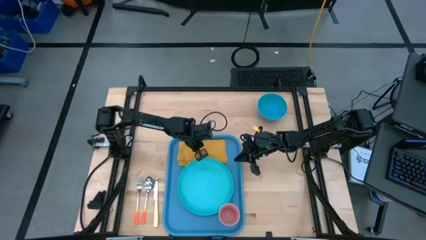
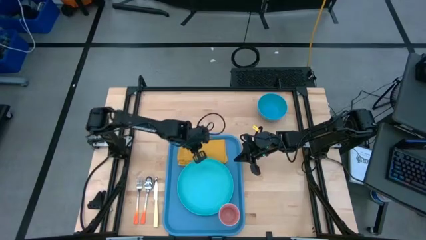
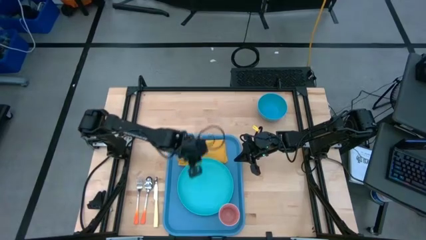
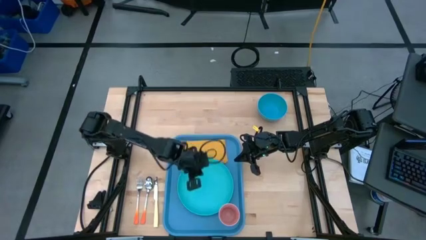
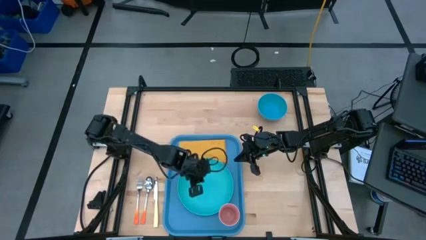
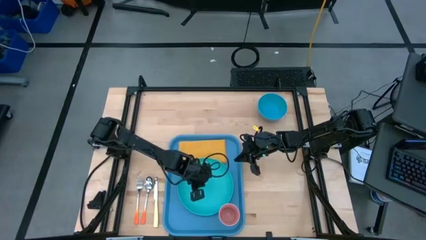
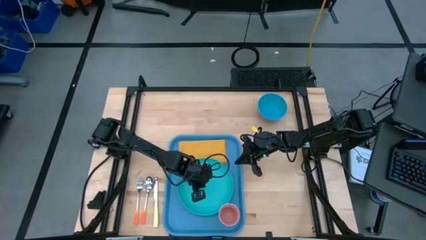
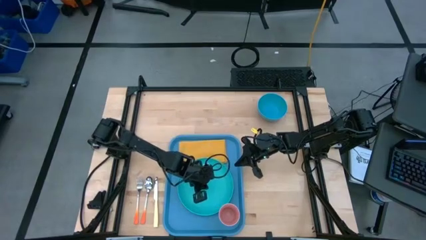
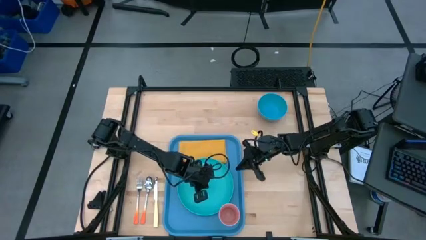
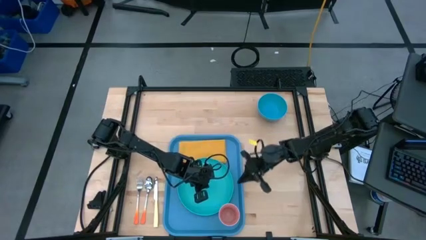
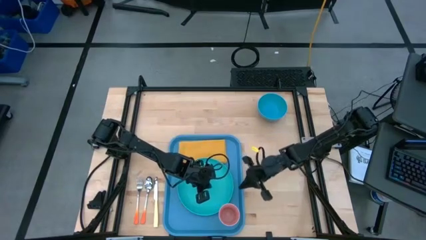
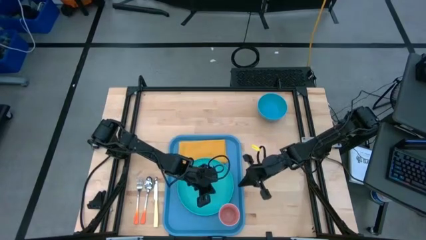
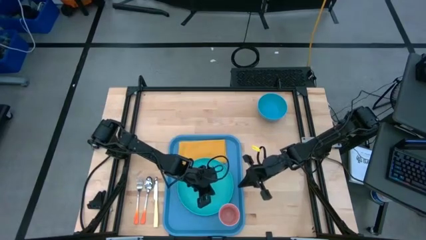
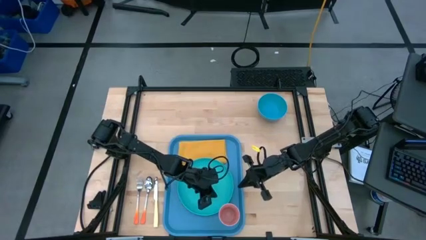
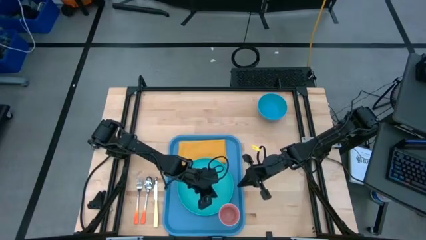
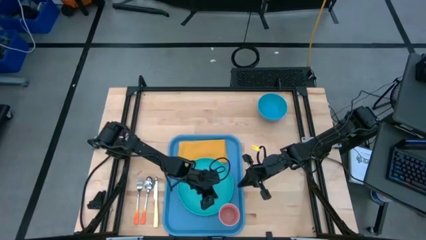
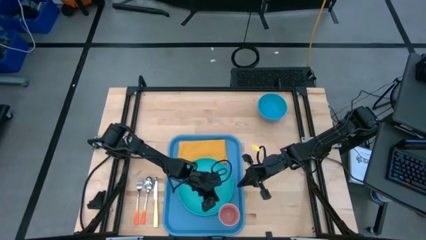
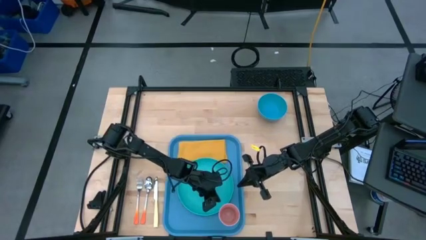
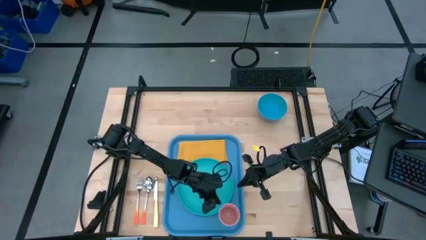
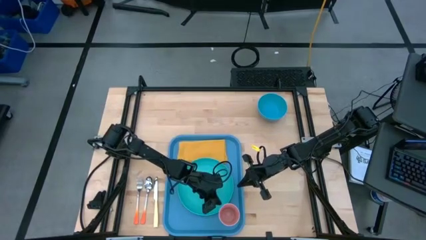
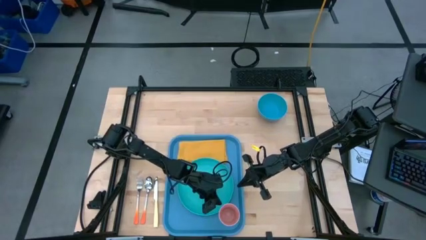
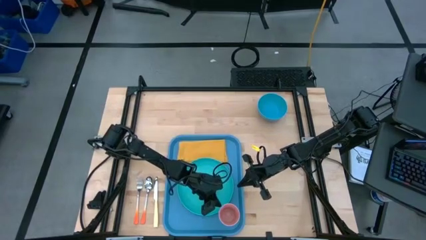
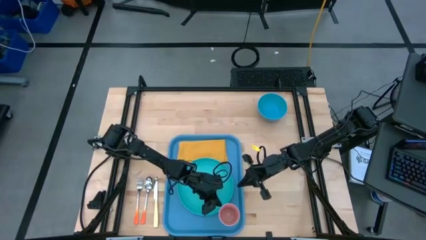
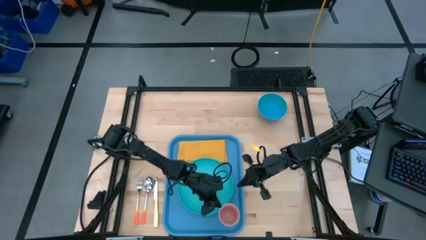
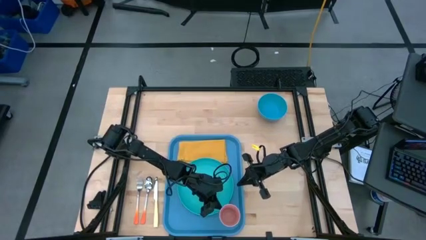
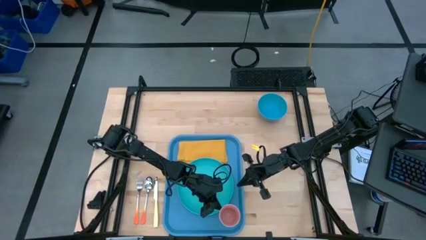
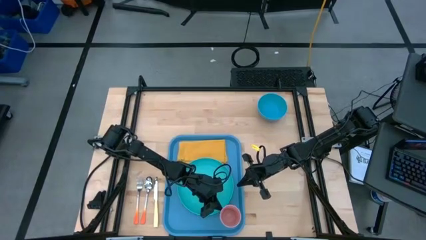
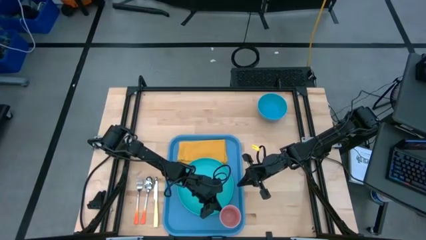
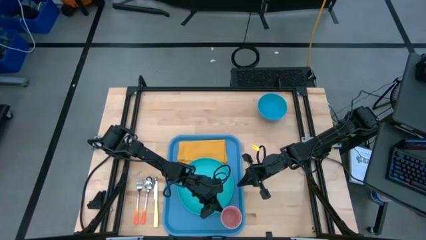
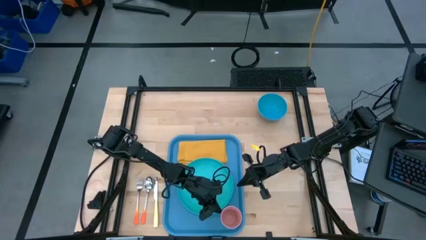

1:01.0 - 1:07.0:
Task: Set up tray
Adjust the pink cup on the blue serving tray

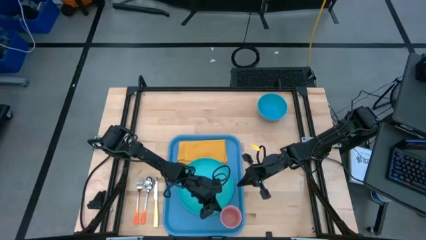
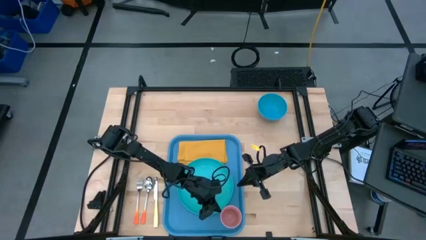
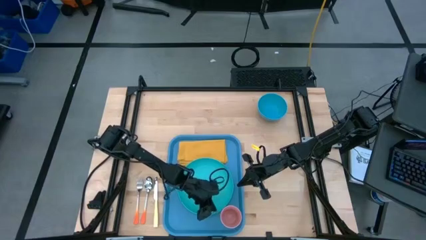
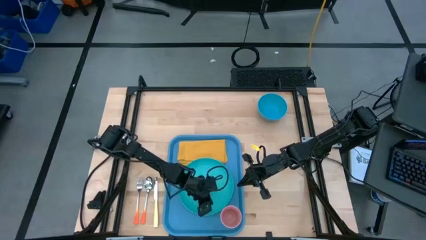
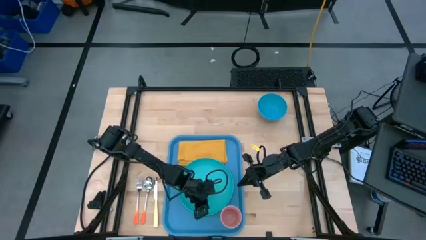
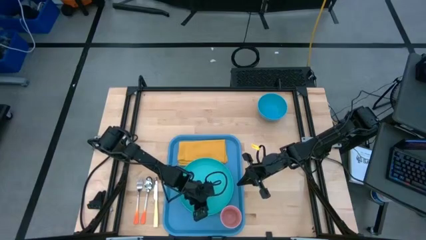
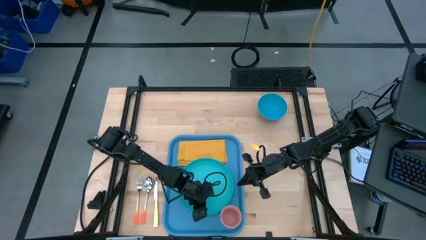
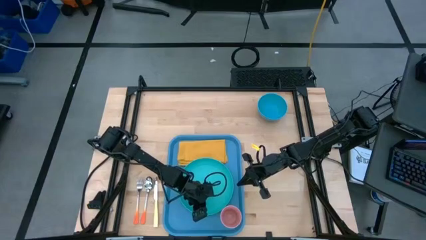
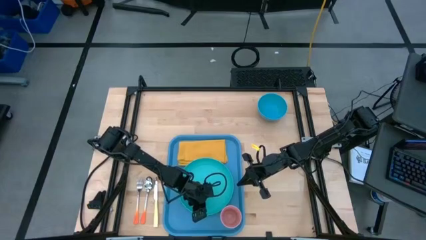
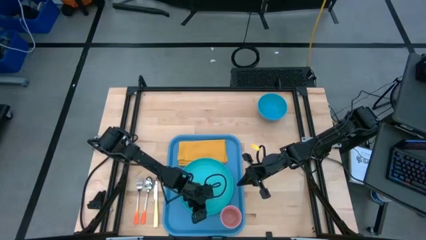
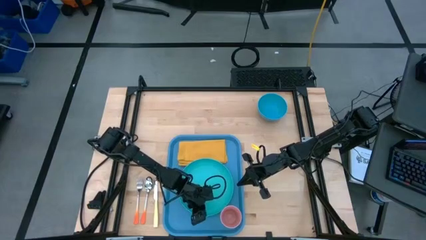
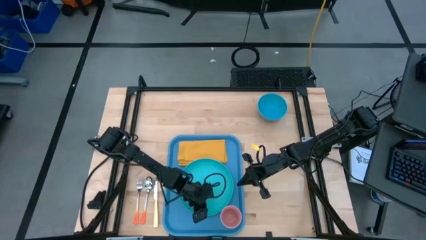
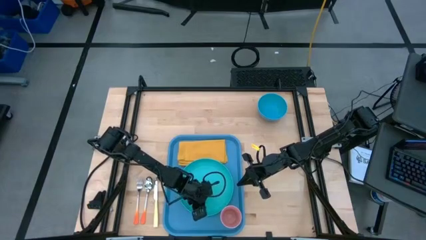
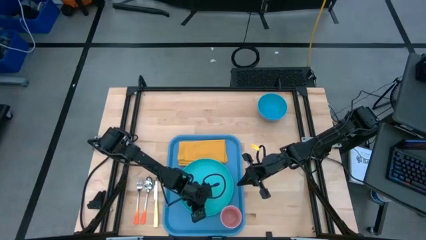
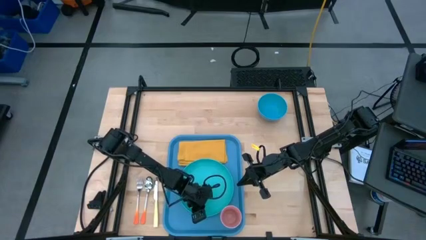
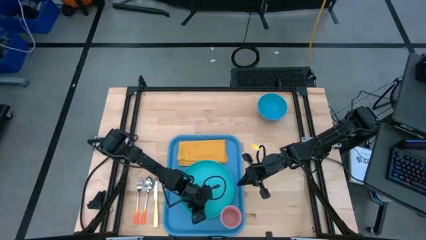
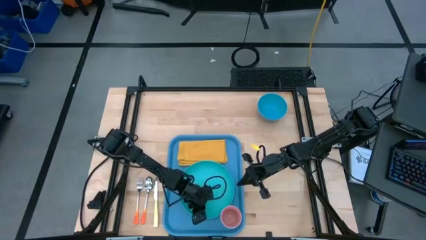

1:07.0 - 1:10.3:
Adjust the blue plate on the blue serving tray

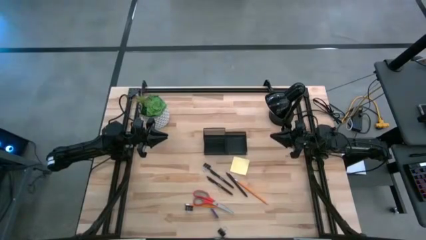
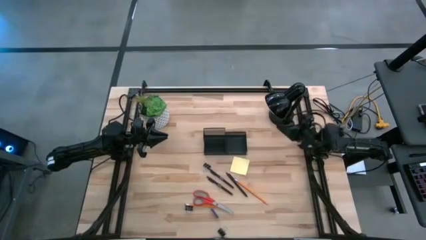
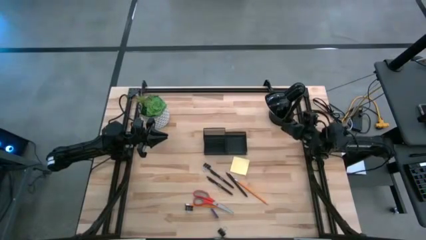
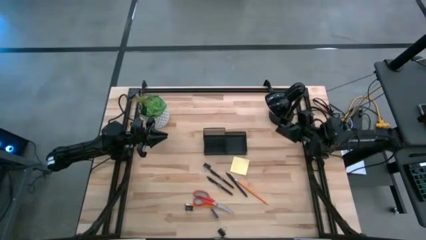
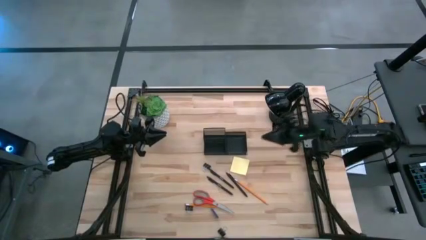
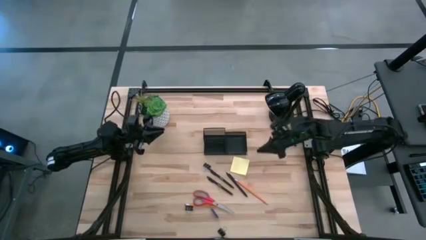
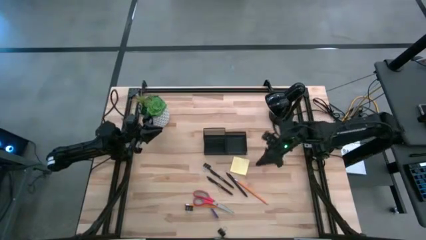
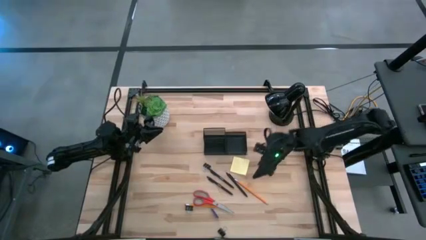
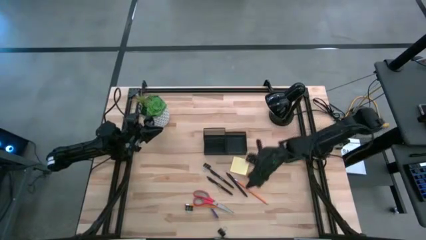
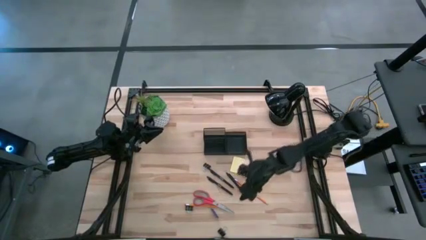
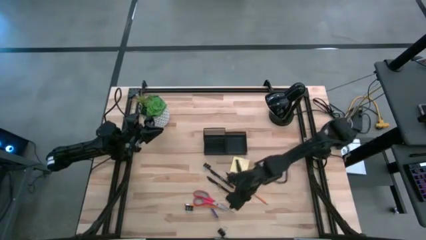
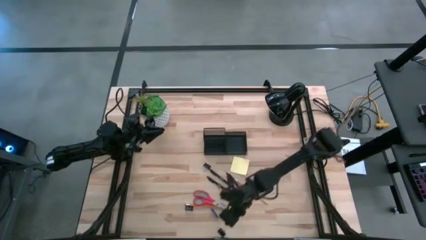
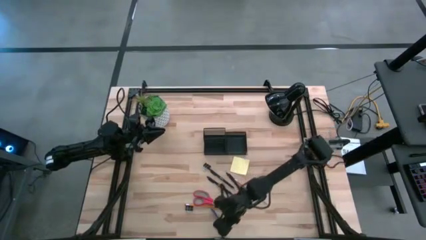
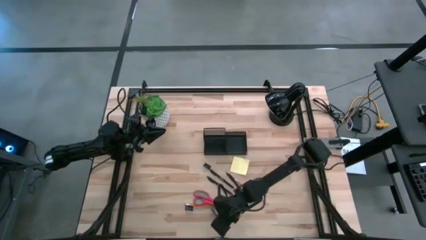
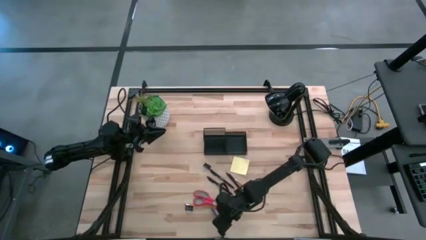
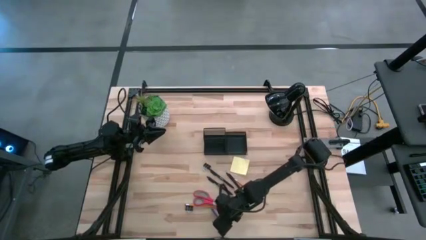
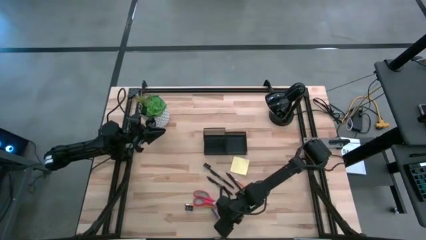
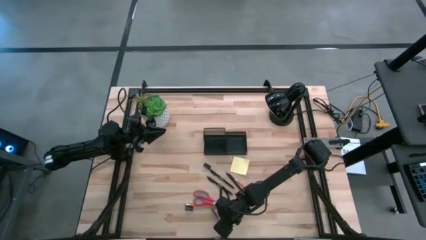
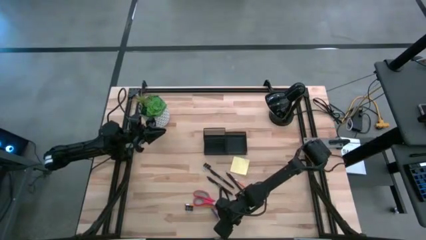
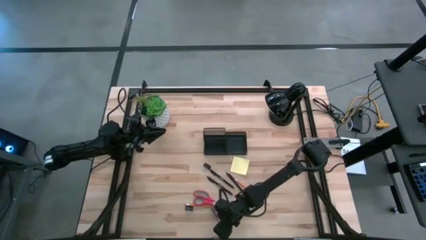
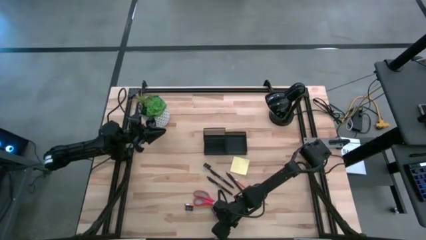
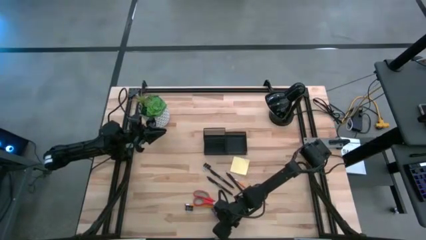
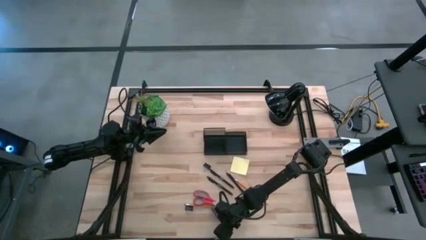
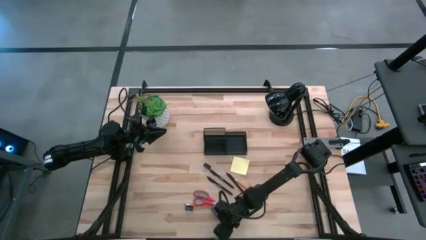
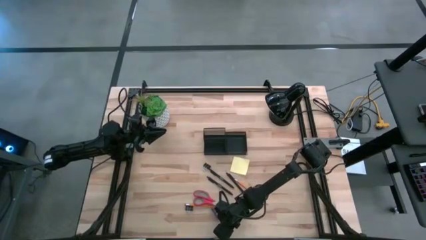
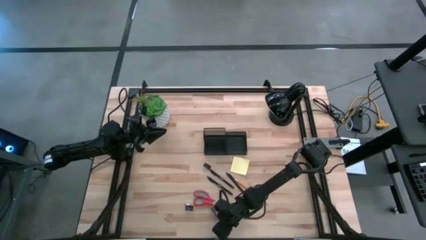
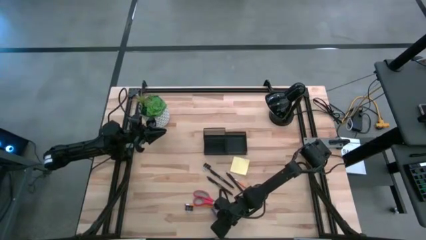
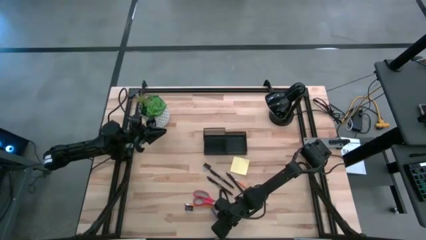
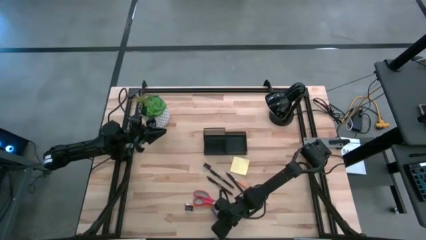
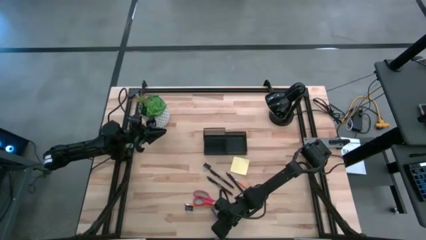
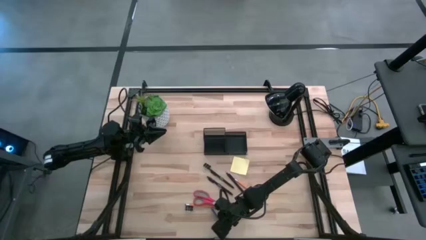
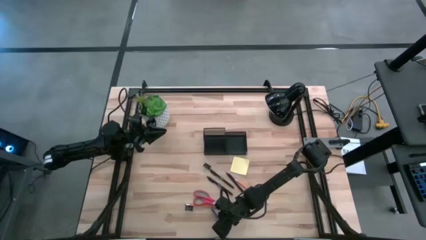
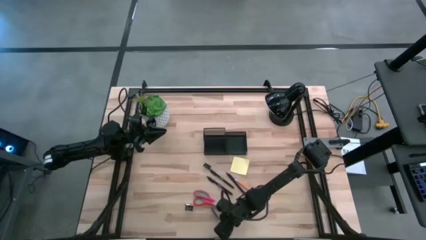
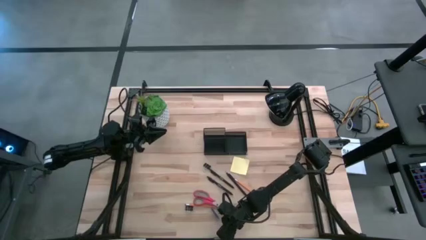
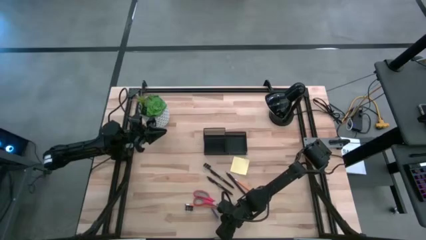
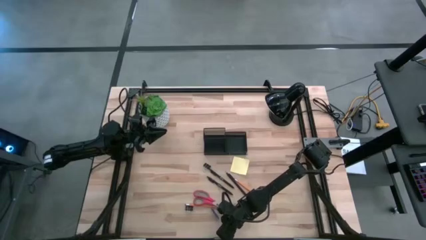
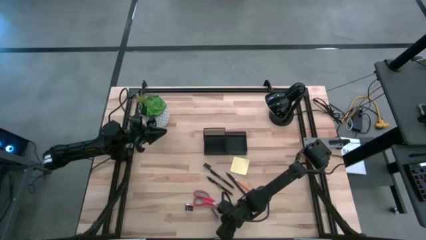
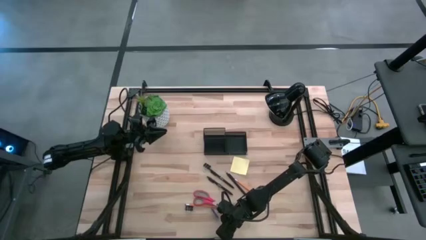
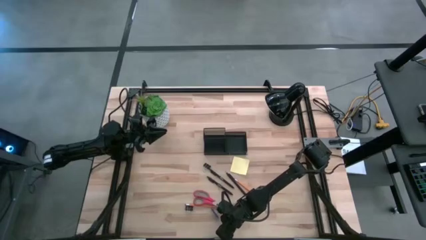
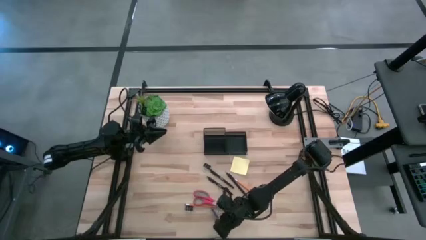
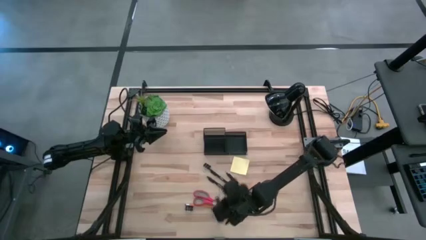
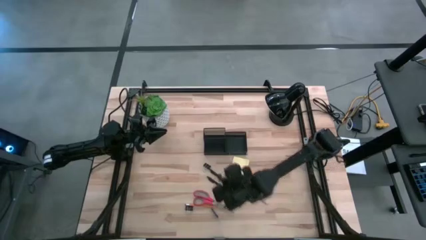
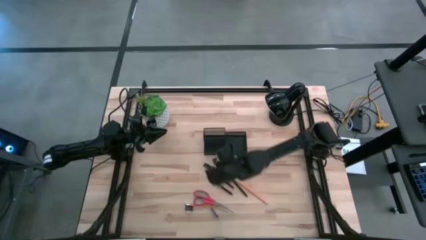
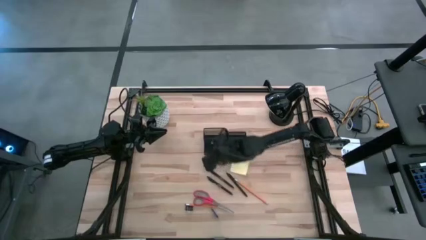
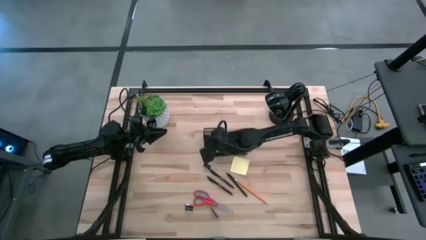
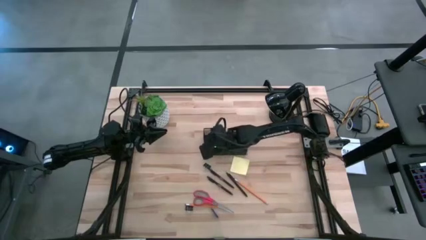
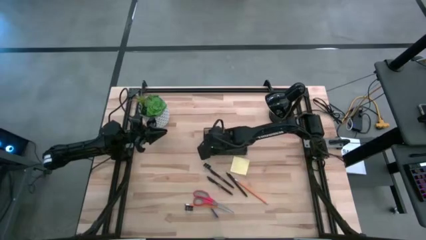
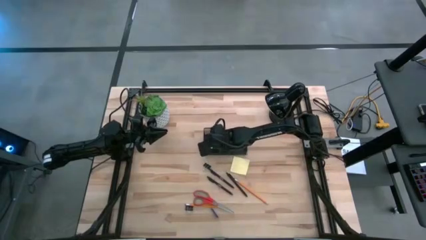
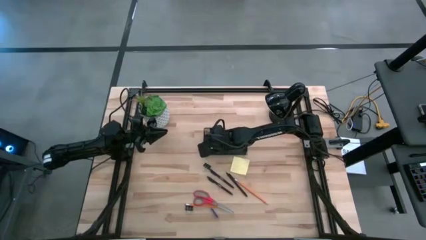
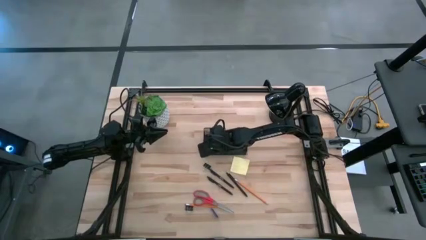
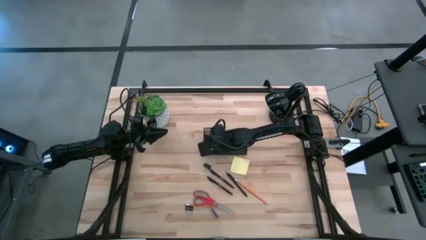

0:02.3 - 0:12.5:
Task: Pick and place office supplies into organizer
Put the bottom black binder clip into the black desk organizer
